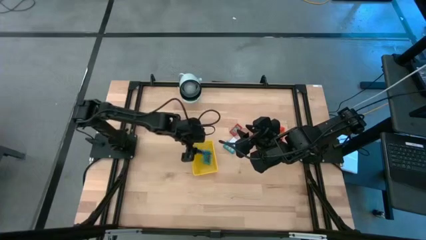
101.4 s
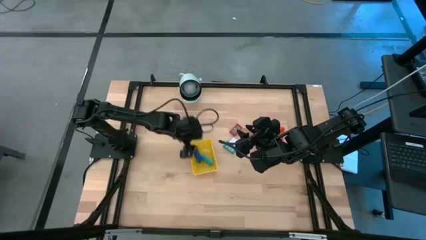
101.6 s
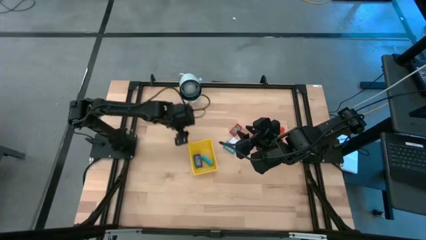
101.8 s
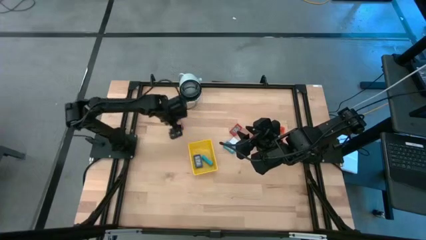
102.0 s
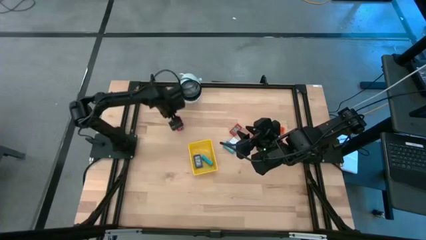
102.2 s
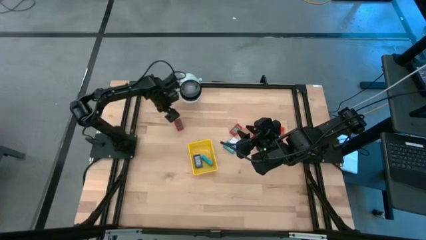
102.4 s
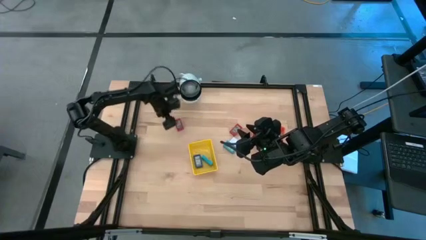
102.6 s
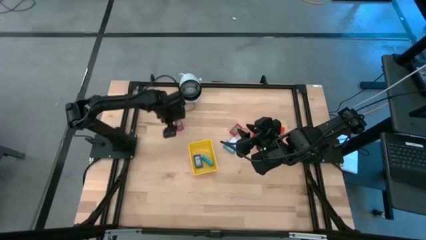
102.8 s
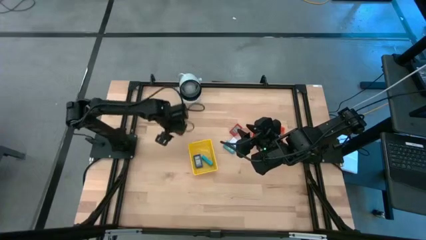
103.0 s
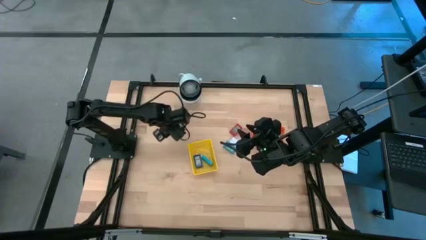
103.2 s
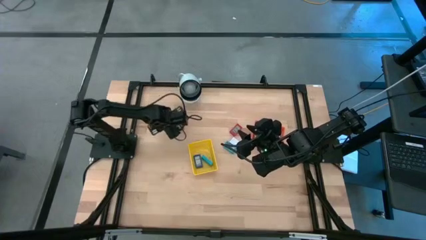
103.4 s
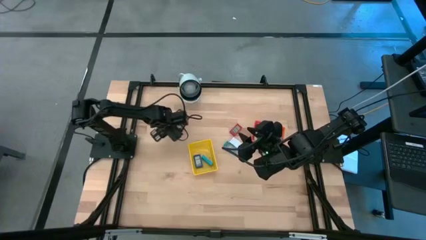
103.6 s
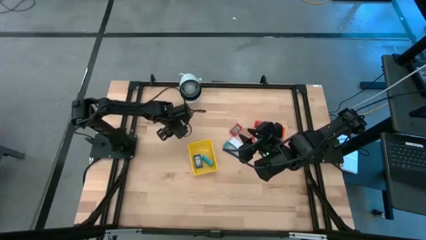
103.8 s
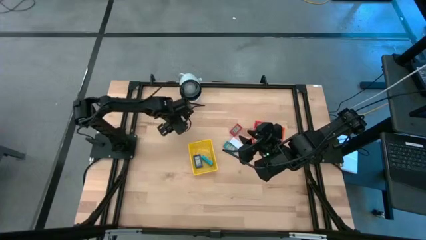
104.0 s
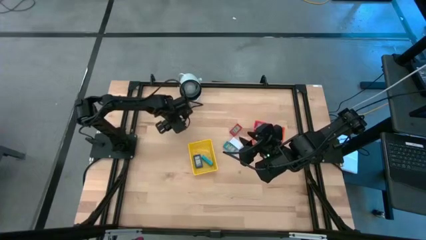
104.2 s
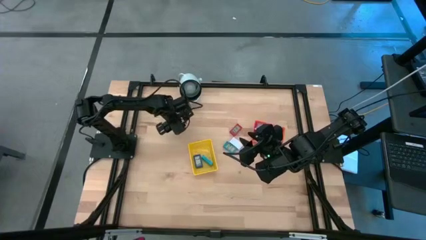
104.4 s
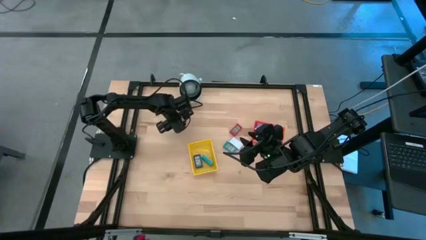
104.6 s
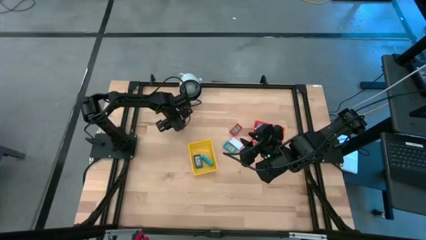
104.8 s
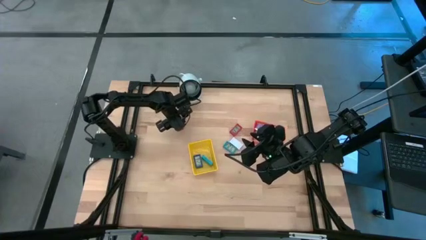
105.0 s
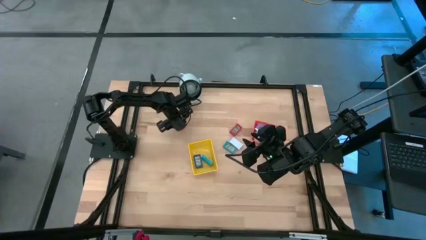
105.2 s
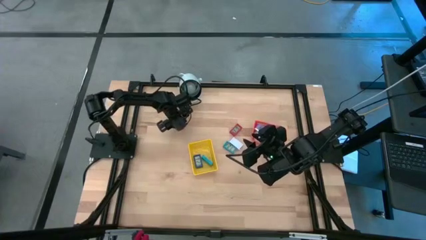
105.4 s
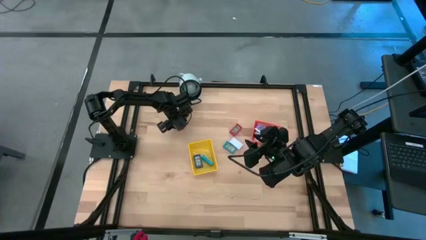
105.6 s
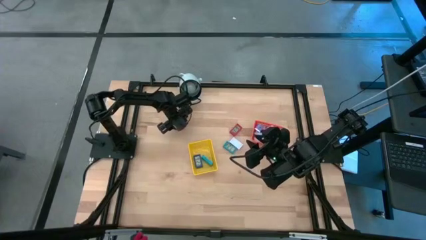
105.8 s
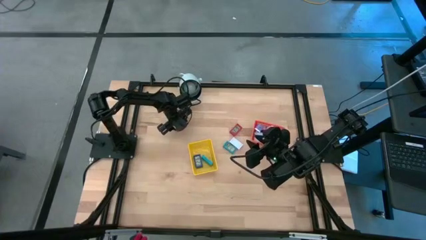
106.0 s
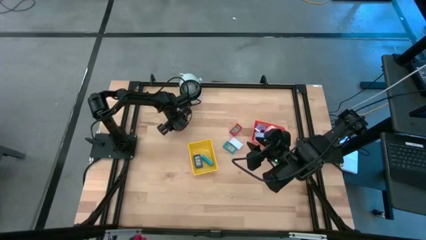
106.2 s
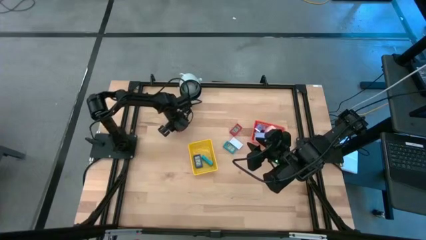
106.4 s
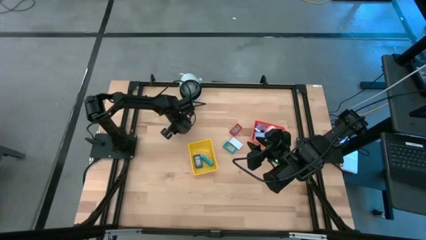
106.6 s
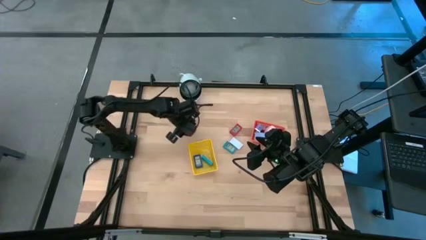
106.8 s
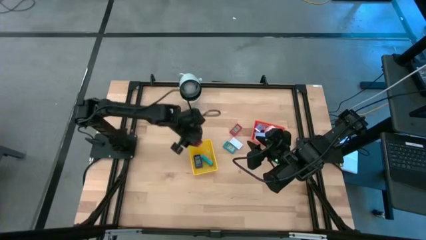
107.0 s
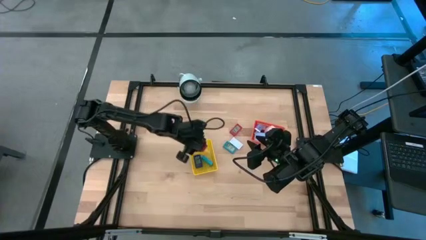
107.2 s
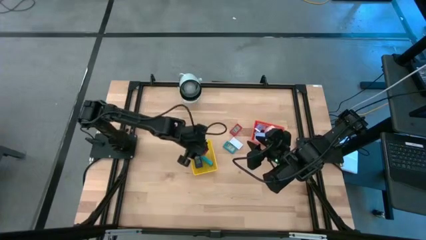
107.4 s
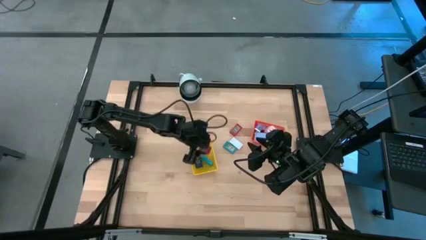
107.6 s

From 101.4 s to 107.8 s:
Task: Pick & Place Office items
Put the left red digital clock into the yellow basket

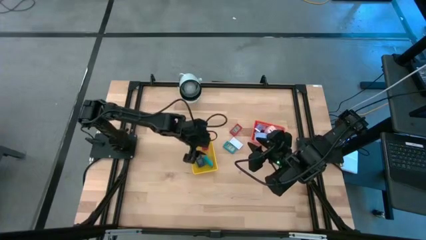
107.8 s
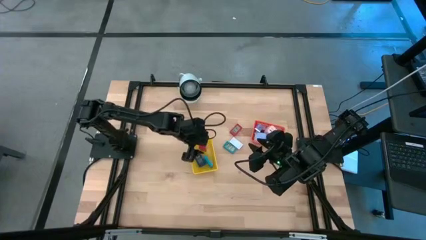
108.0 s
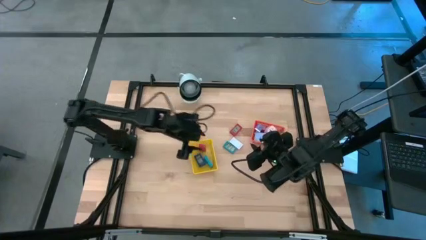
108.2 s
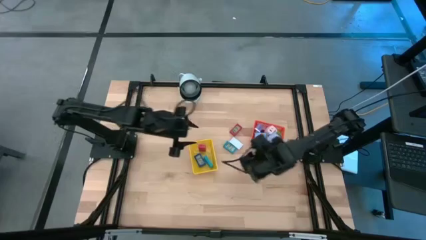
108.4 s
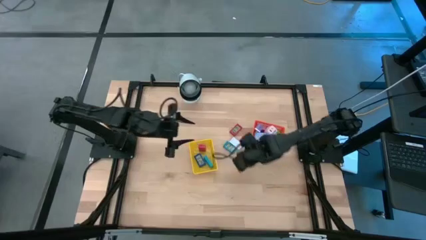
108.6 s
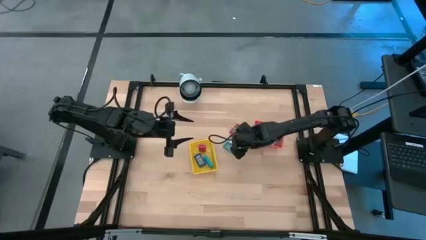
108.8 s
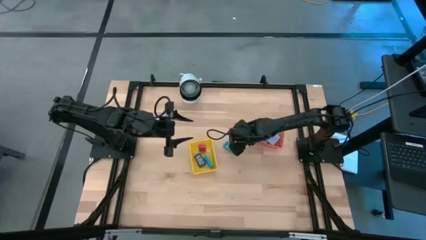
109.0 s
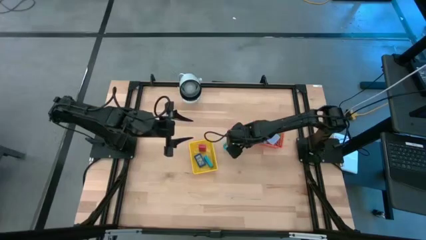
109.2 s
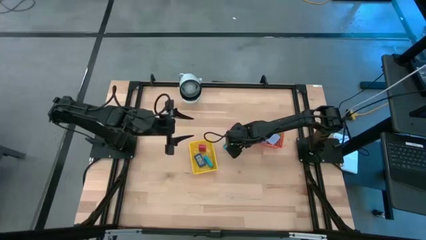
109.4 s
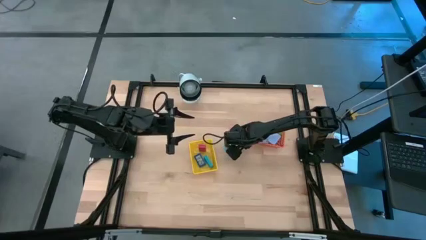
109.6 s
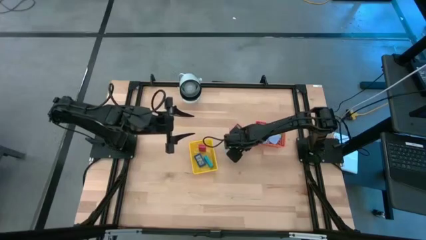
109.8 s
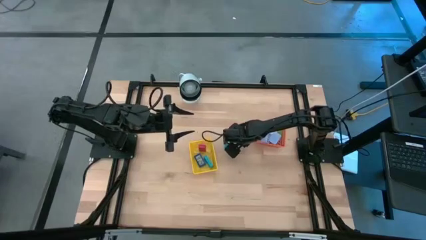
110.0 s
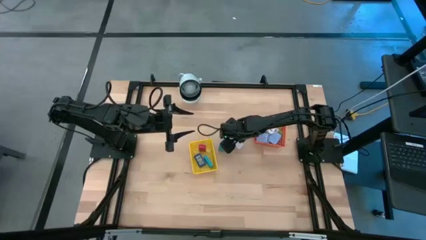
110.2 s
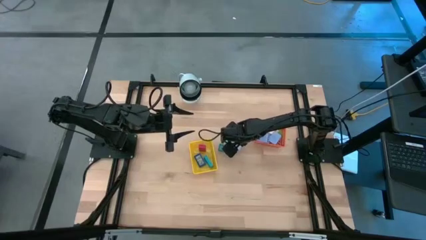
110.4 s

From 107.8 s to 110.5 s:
Put the white digital clock into the yellow basket

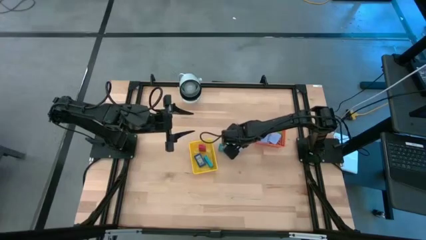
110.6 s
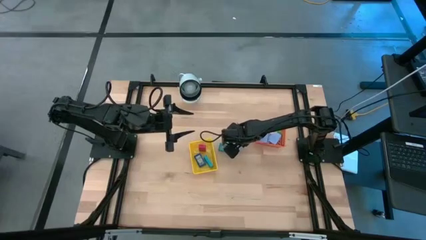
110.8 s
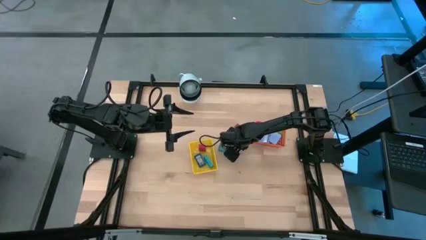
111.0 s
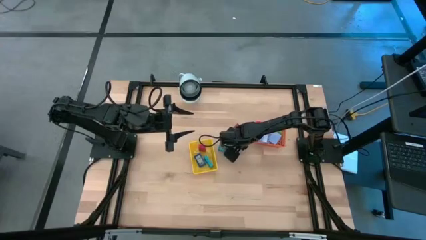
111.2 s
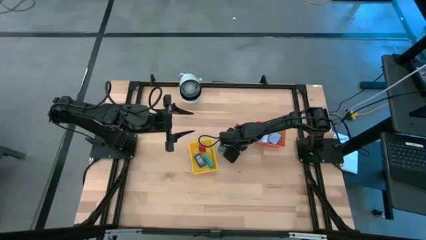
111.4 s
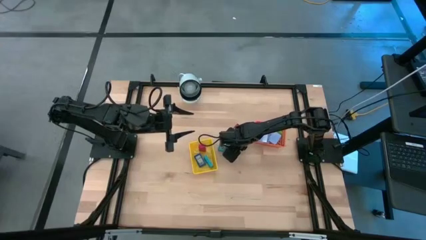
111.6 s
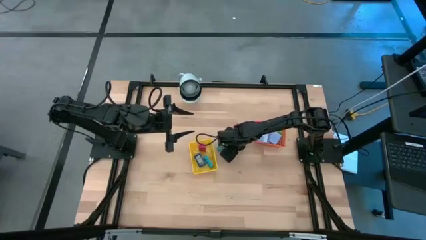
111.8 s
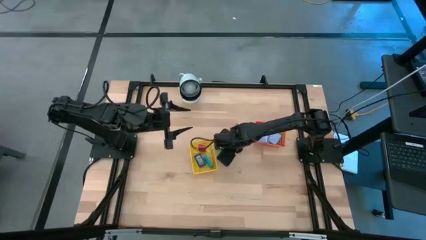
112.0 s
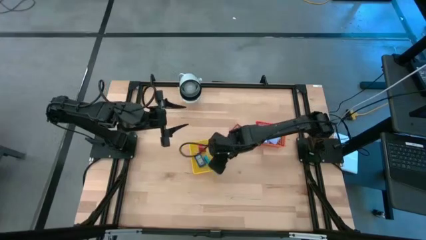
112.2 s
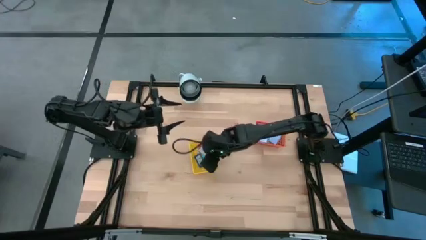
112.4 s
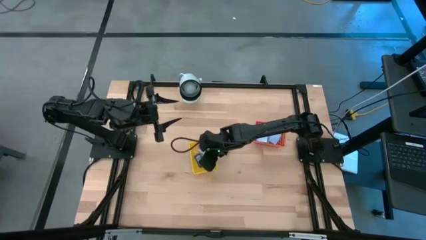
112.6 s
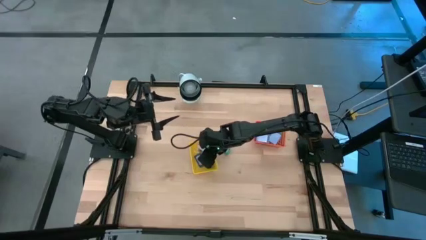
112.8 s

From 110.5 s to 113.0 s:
Put the white digital clock into the yellow basket

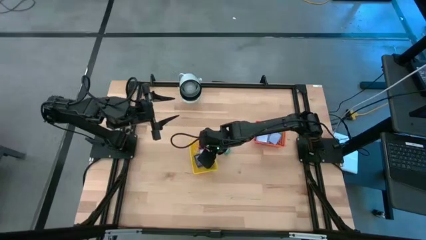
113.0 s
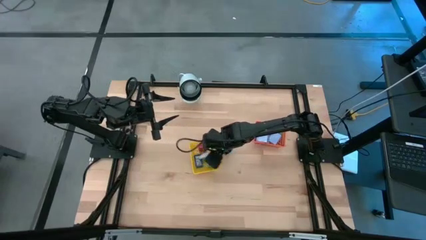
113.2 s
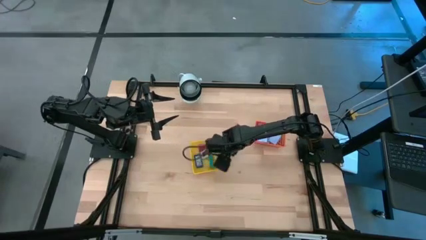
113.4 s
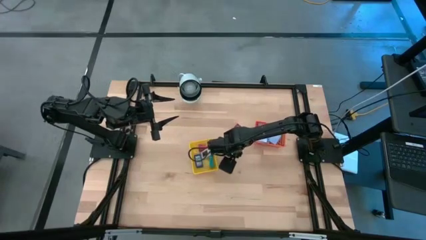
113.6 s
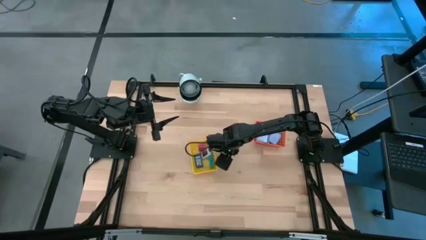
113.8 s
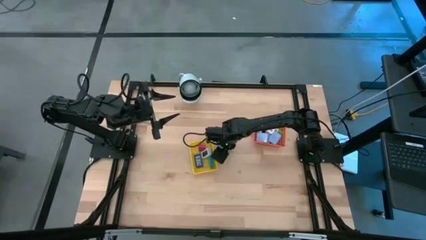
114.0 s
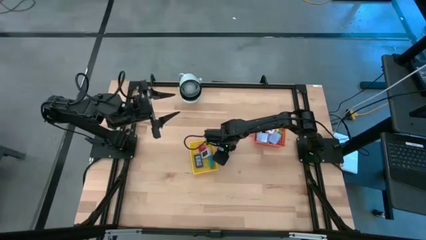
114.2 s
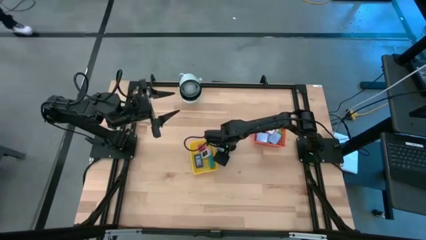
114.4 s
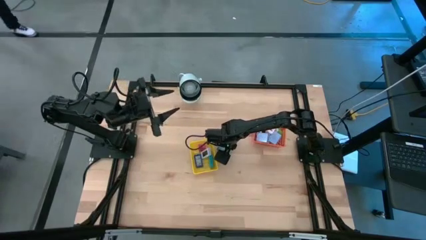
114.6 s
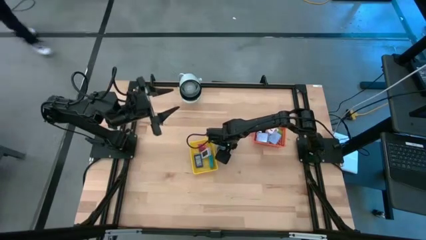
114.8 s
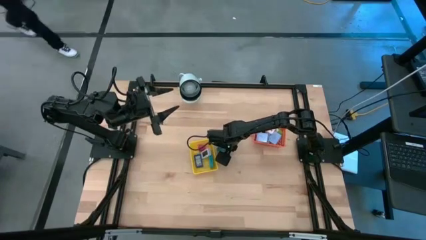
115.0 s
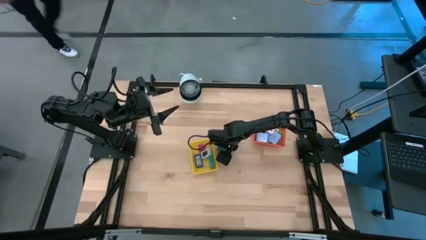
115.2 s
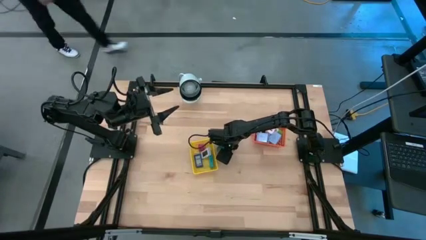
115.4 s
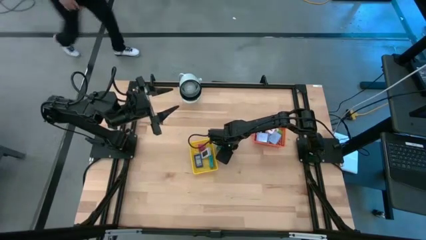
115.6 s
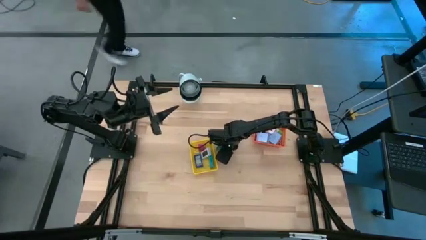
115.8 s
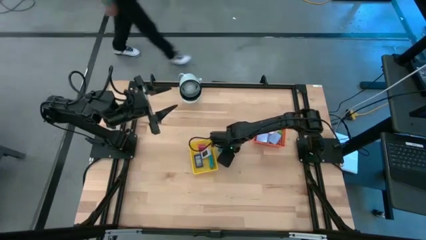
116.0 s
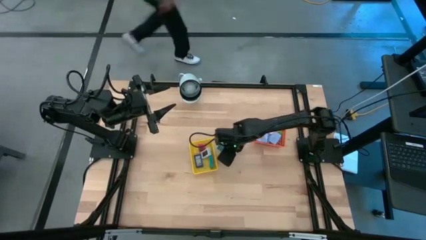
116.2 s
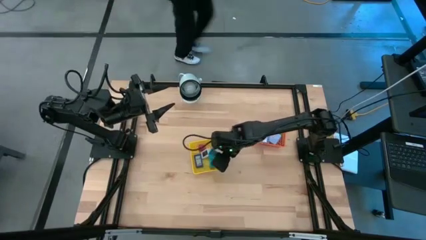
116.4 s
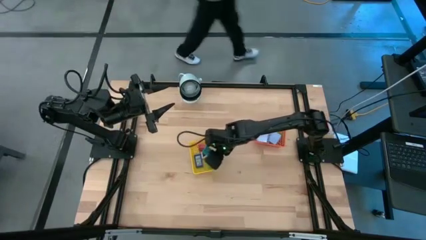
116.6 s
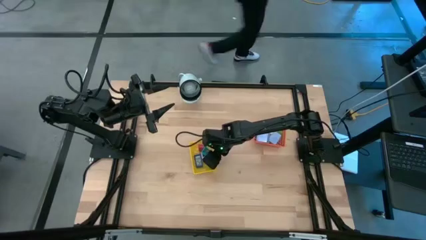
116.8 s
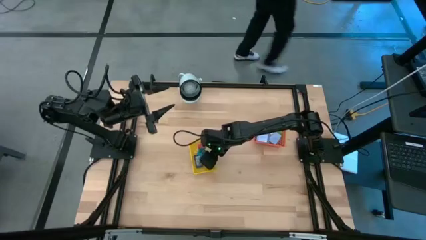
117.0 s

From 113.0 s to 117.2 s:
Put the light blue digital clock into the yellow basket

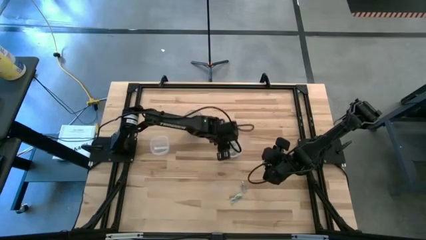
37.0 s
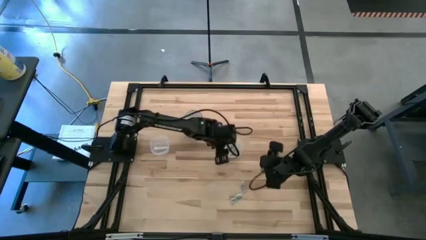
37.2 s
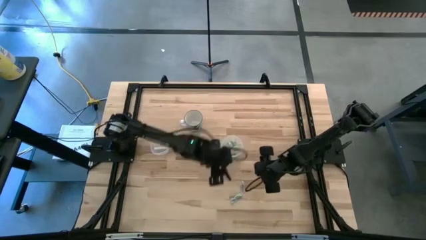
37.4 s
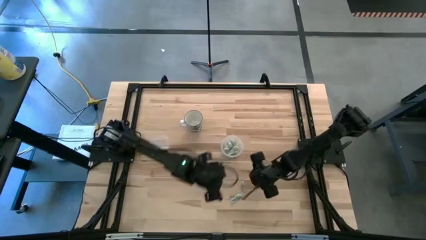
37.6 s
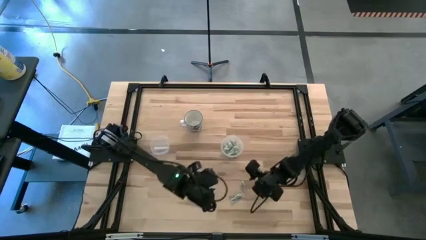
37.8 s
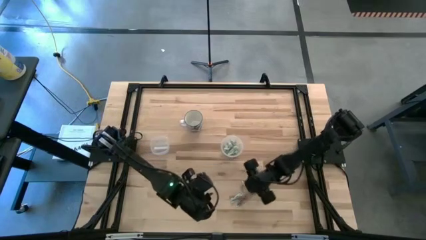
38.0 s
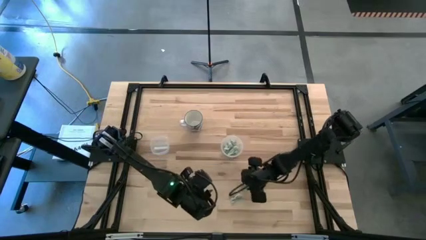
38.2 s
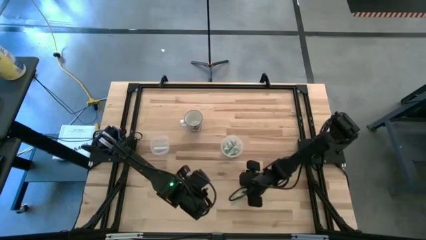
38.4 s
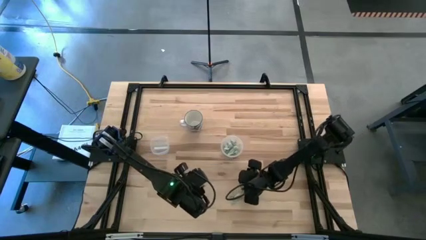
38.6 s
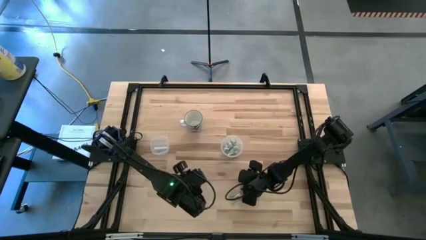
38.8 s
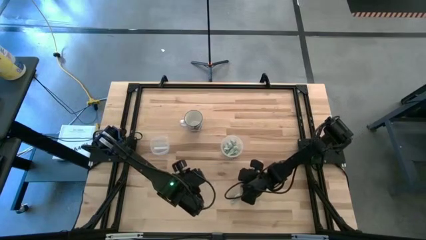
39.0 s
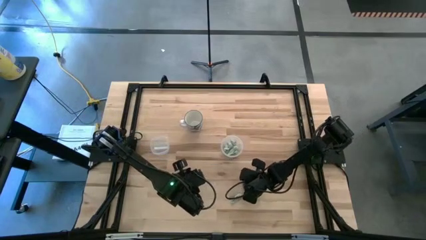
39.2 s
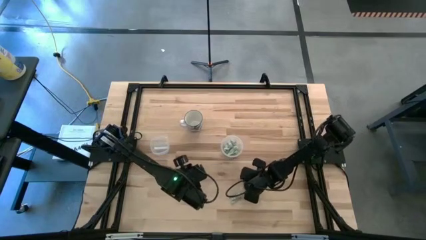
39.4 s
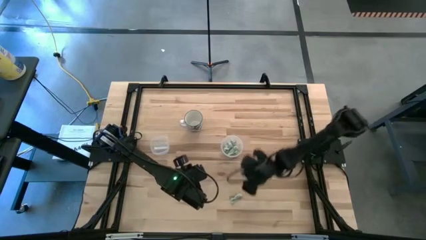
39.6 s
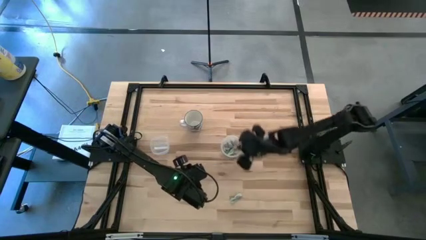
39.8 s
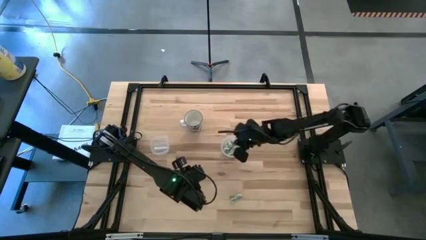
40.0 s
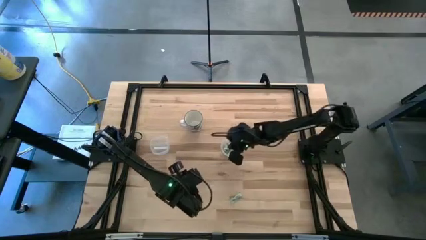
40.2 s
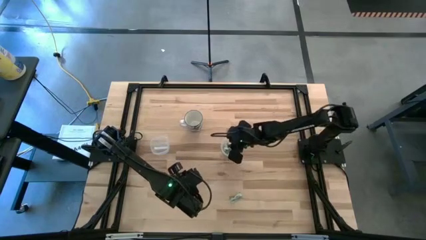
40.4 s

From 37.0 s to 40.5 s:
Task: Pick and place Stevia / Truvia into bins
Put the green stevia packet into the right transparent container
